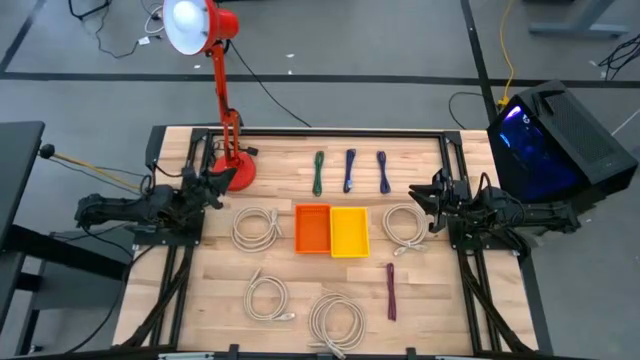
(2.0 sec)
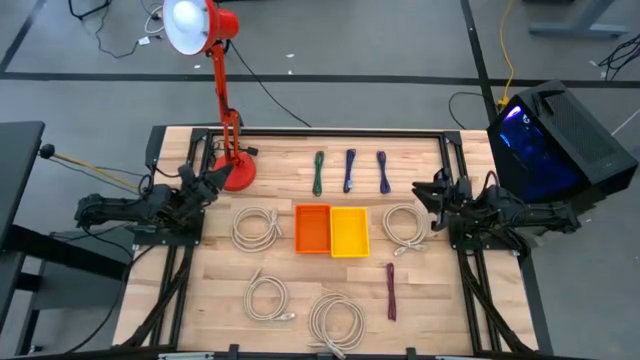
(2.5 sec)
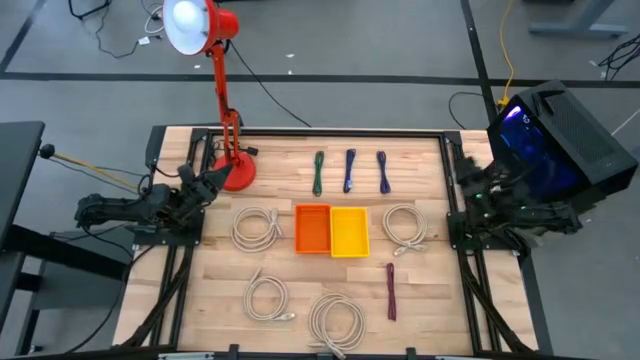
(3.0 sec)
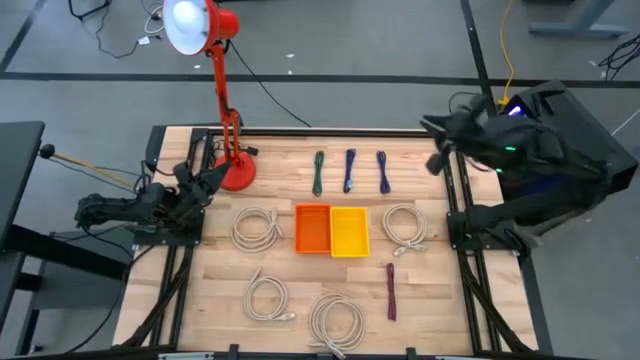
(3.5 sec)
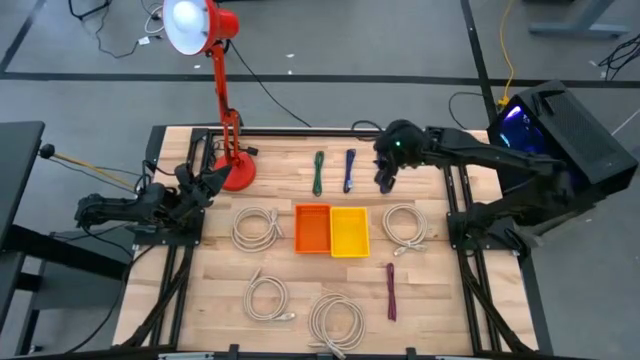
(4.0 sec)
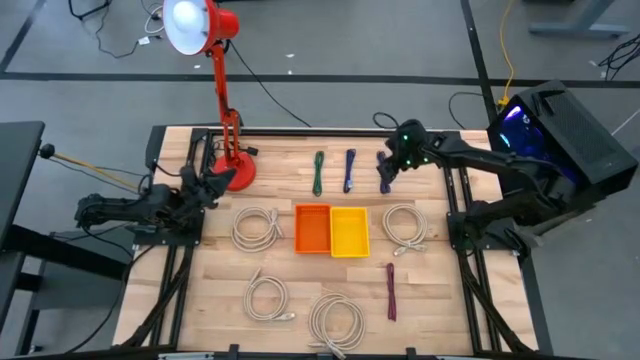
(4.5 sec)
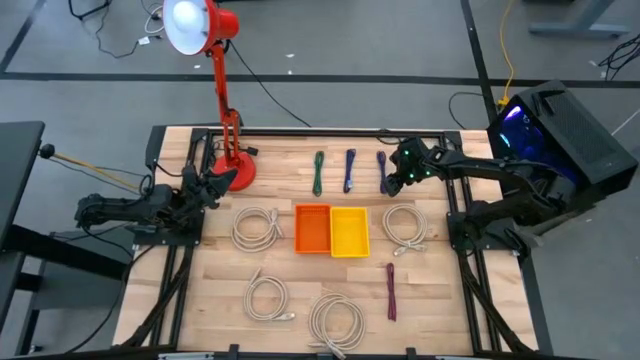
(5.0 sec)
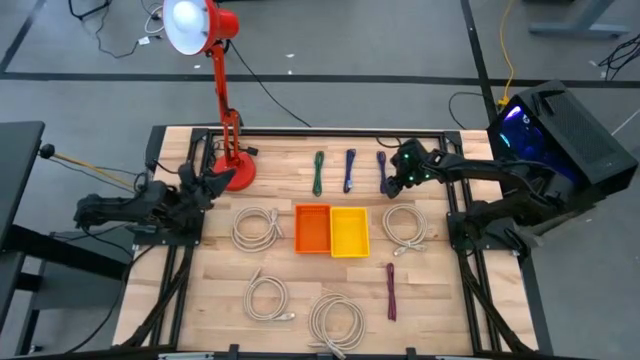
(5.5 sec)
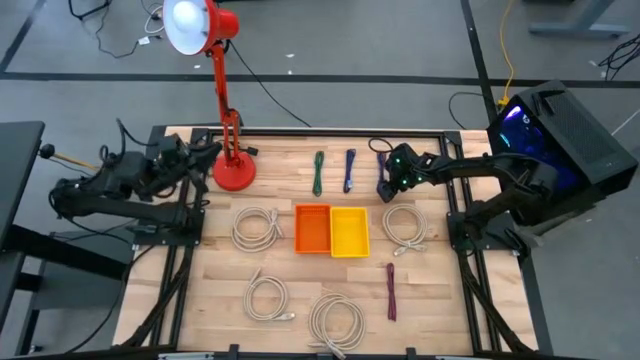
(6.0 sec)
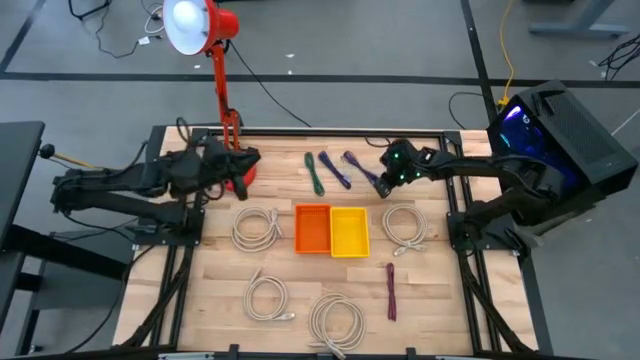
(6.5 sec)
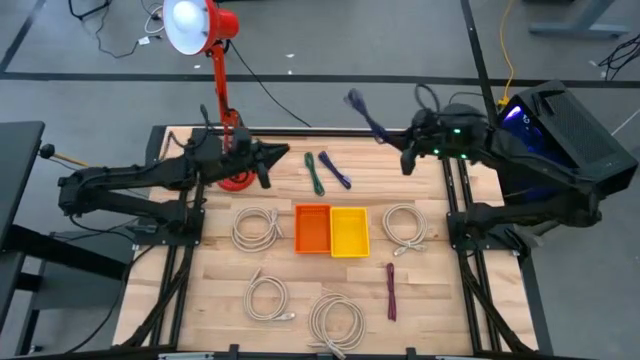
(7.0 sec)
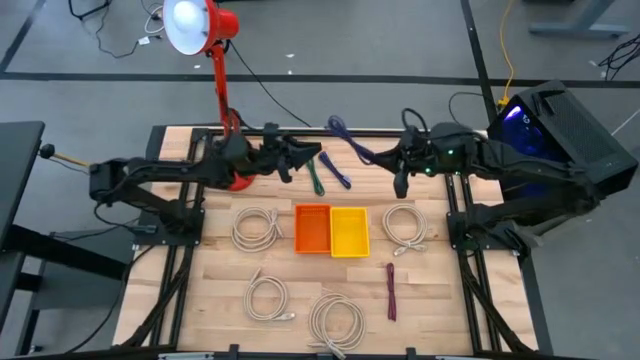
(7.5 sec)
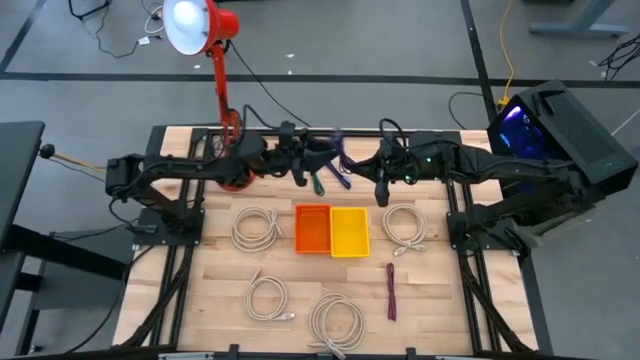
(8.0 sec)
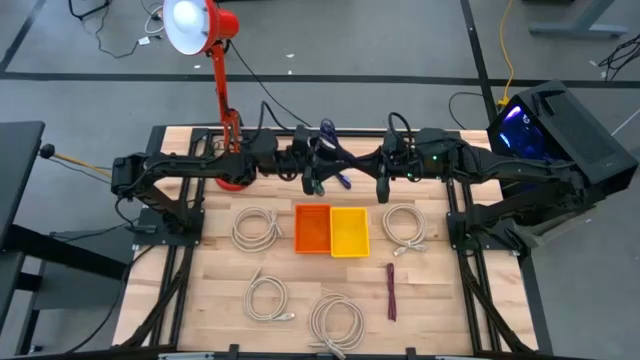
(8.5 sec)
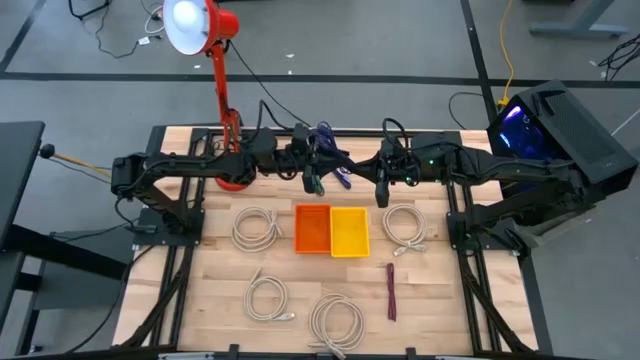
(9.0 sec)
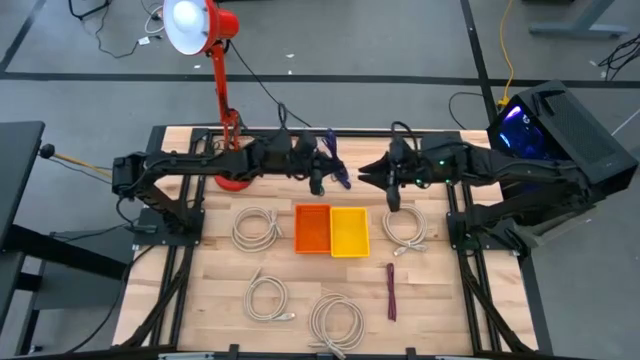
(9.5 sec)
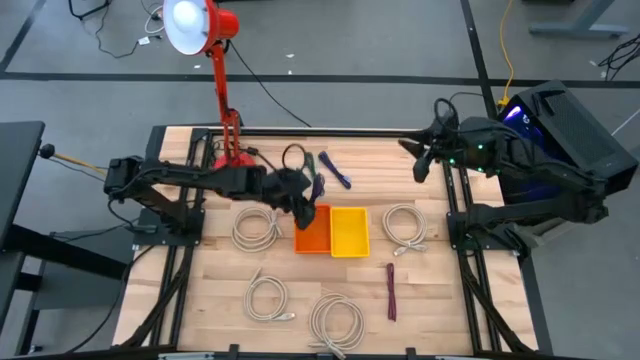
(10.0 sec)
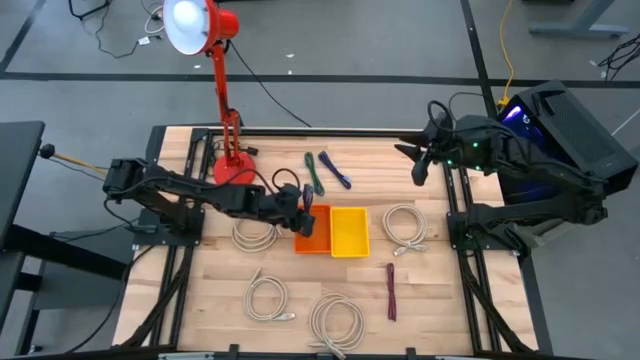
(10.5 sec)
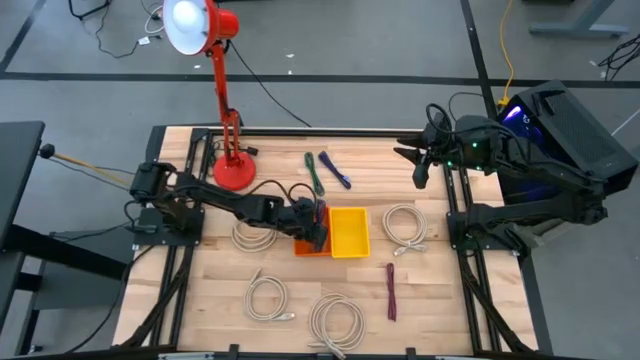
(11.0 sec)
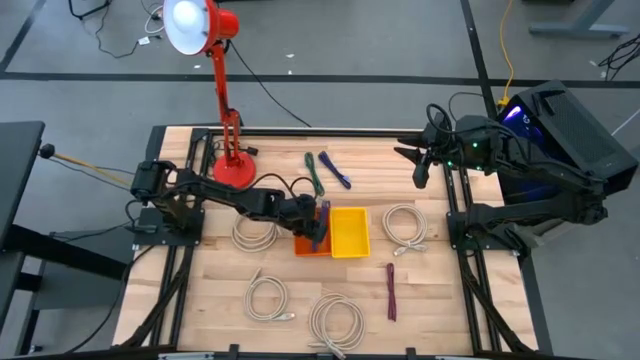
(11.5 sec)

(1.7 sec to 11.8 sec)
Task: Pick & Place USB Port
Put the purple USB cable into the orange bin

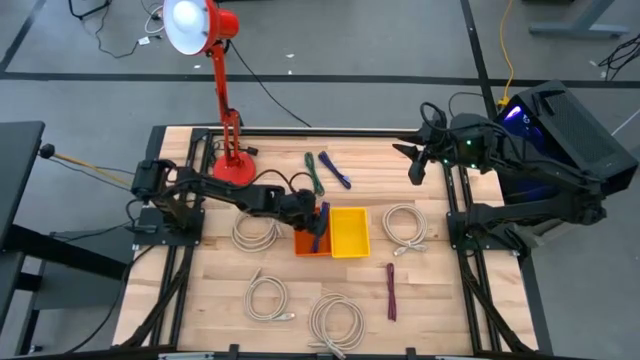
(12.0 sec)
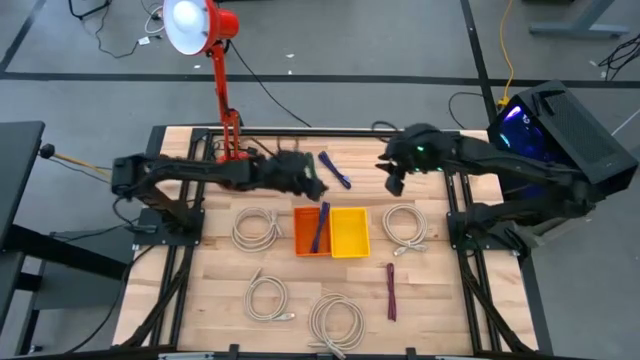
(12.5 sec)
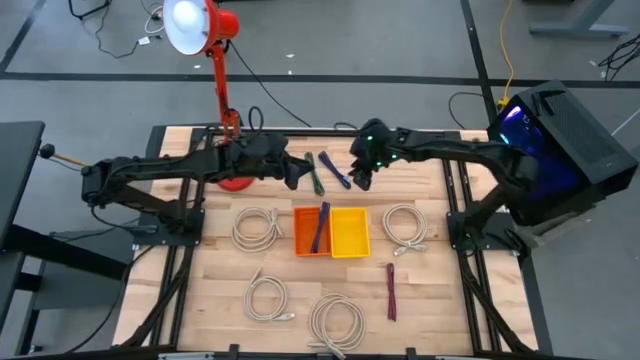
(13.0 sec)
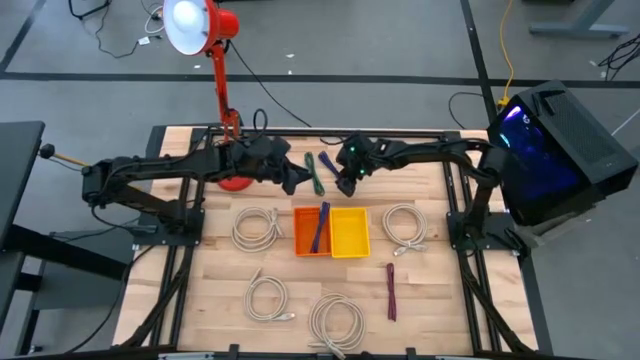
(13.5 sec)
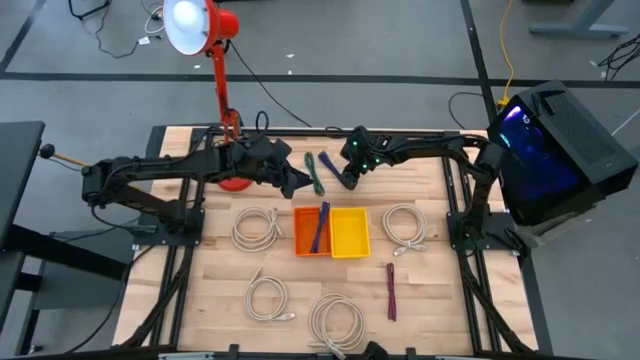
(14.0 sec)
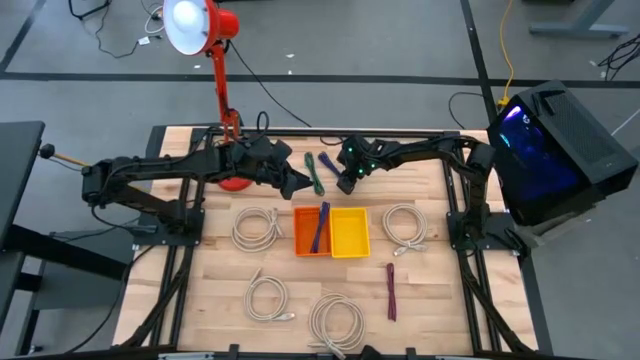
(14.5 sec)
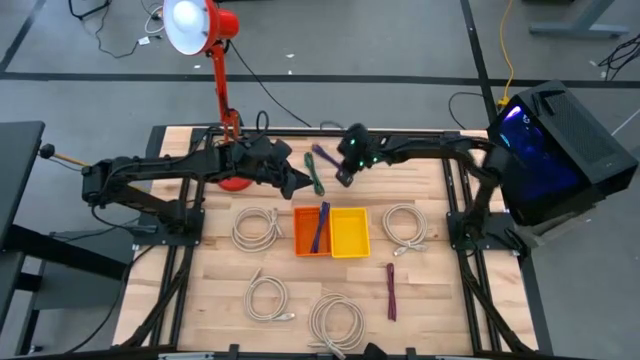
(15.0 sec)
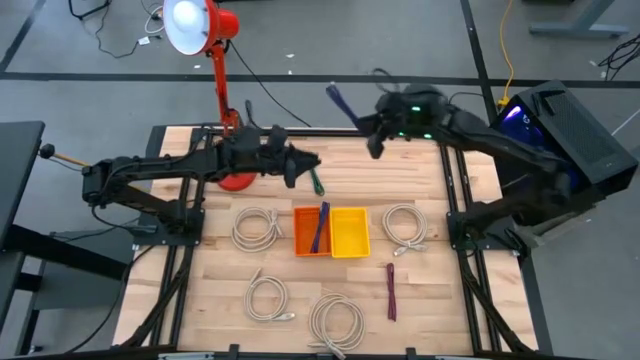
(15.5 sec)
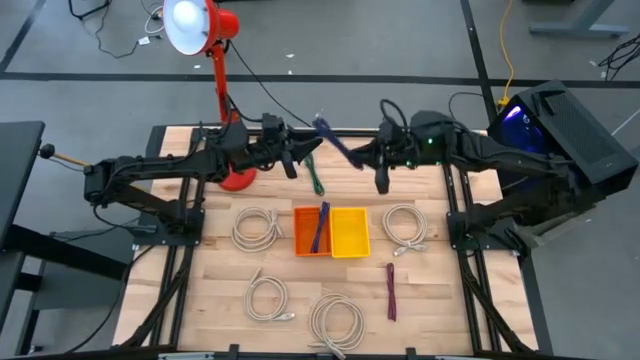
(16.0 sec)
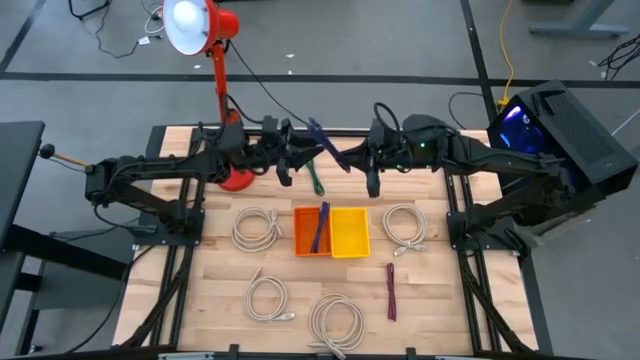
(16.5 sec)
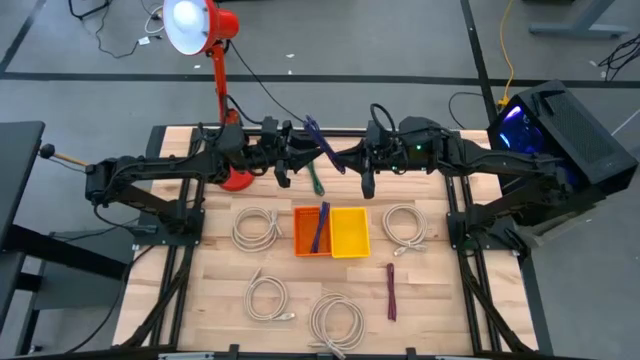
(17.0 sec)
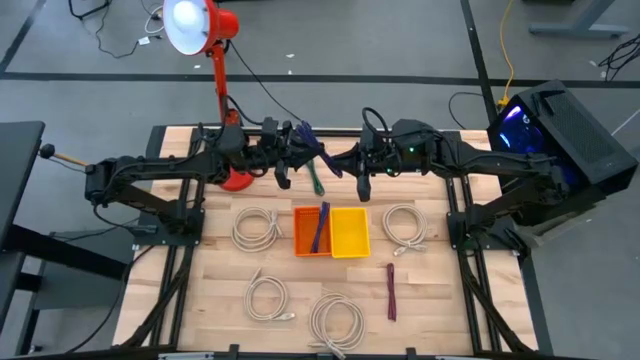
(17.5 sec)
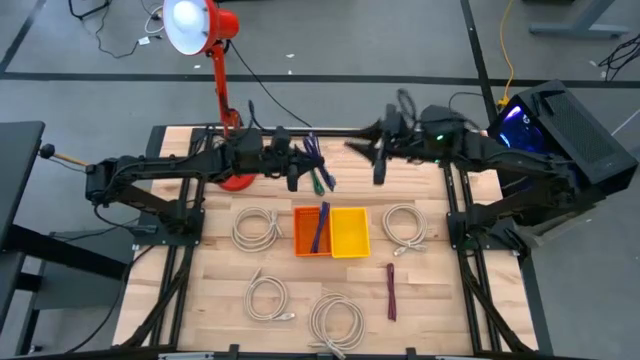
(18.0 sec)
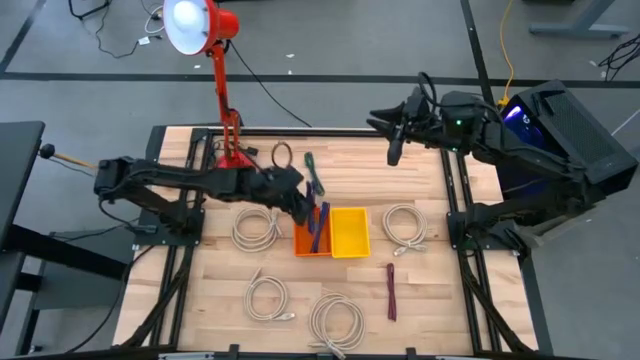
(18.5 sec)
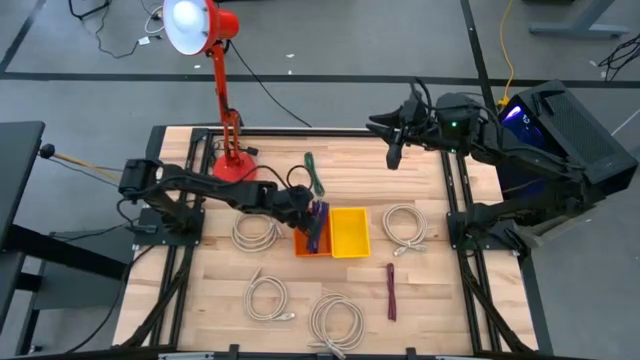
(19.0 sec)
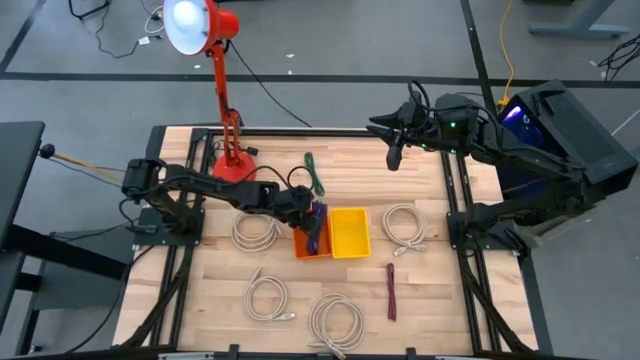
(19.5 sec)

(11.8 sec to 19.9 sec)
Put the purple USB cable into the orange bin

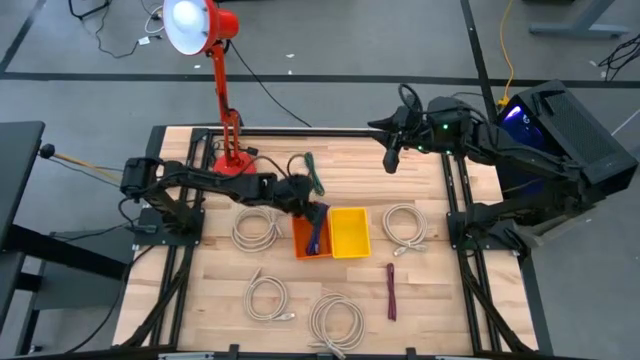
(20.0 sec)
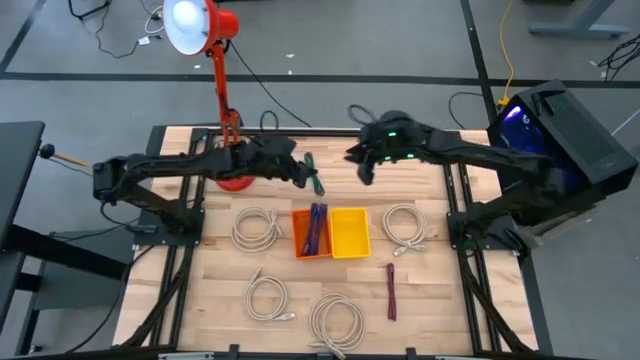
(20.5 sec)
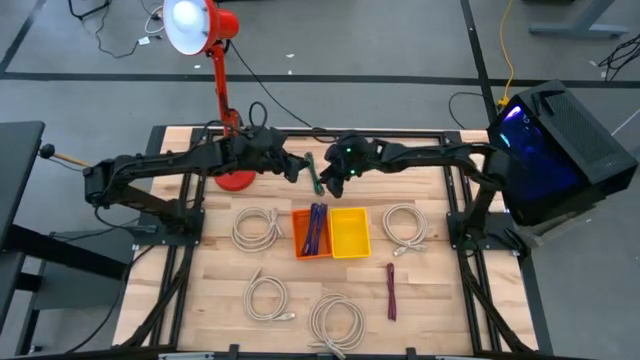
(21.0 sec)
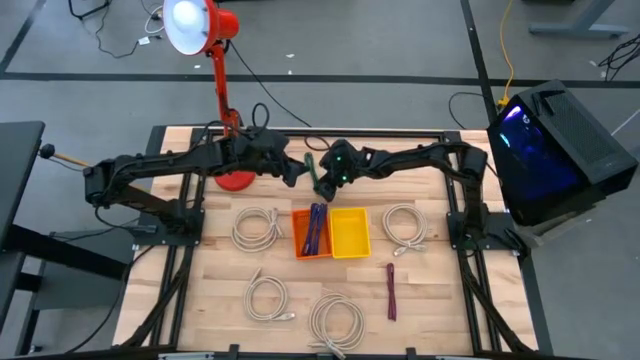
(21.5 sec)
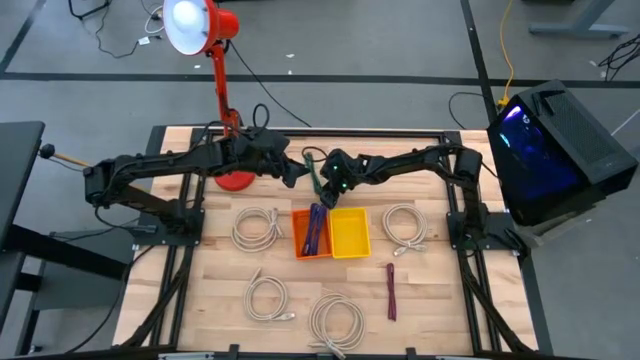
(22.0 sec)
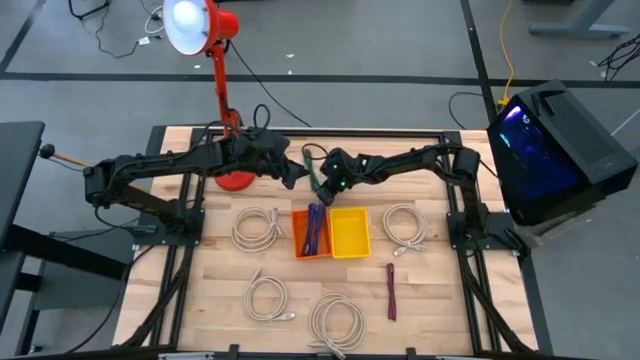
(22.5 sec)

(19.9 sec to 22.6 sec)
Put the green USB cable into the orange bin
